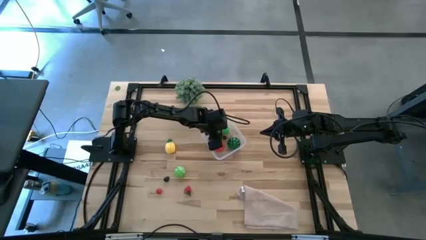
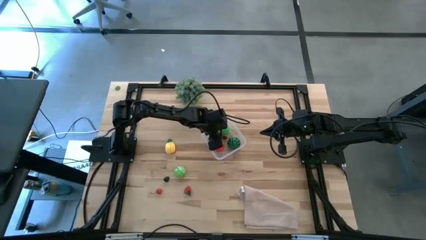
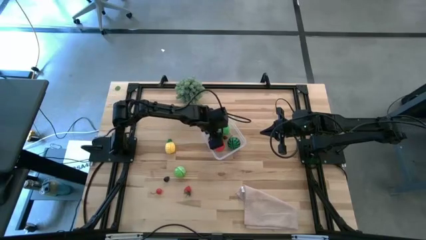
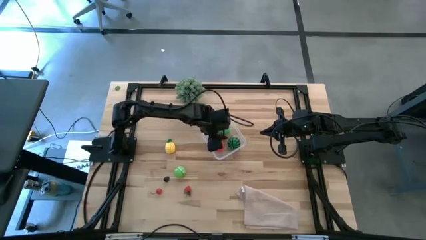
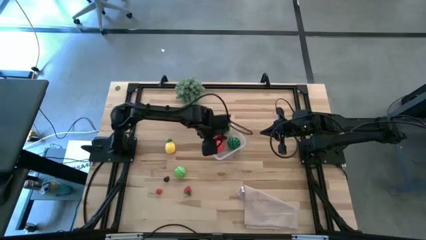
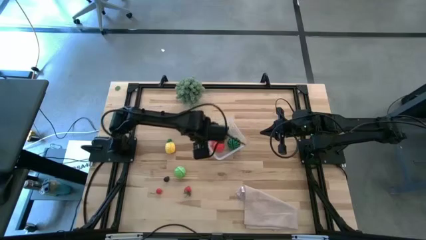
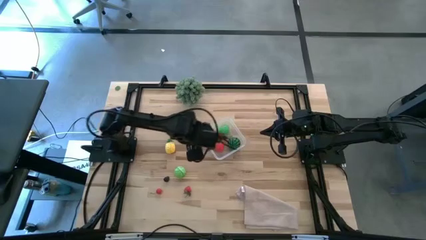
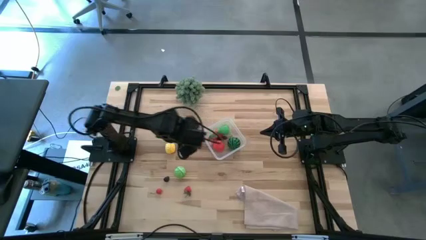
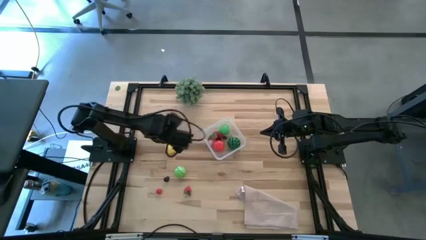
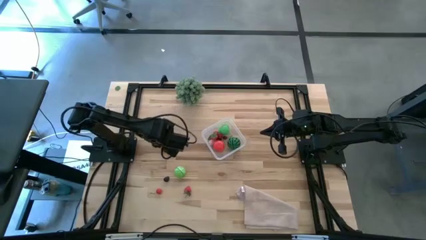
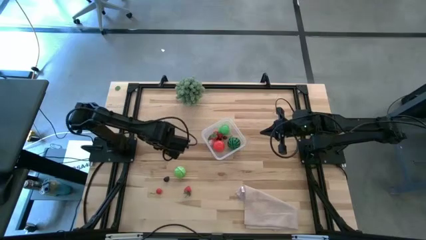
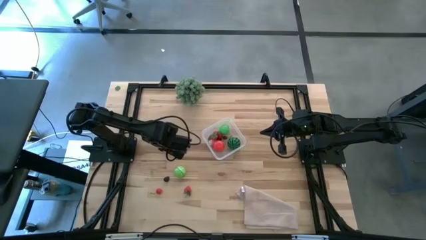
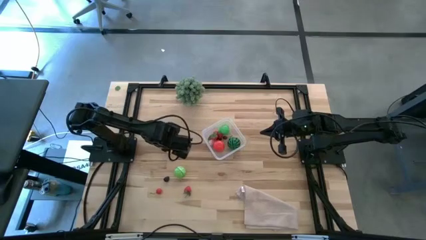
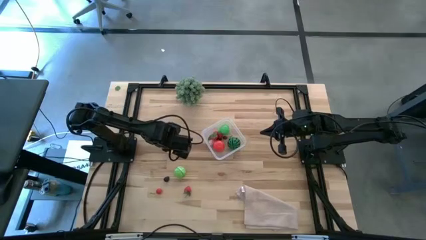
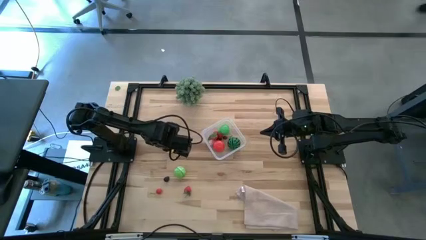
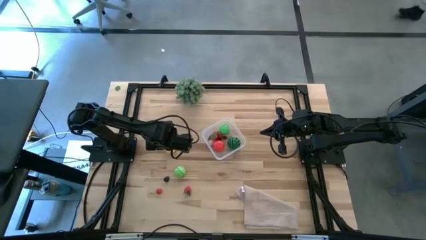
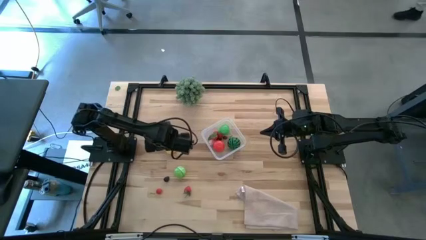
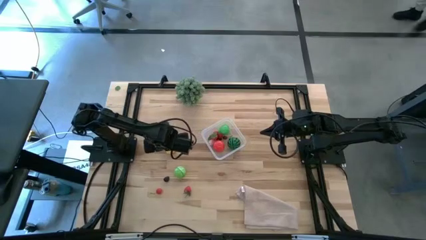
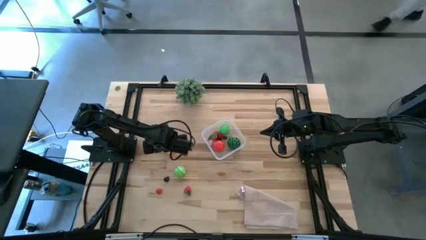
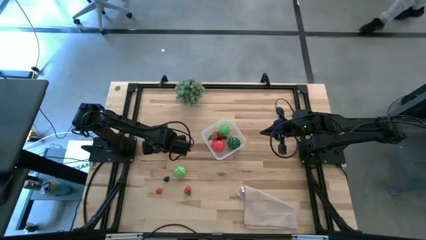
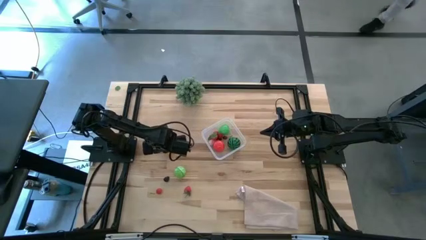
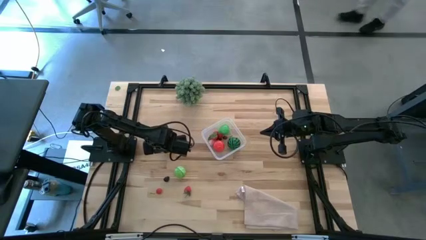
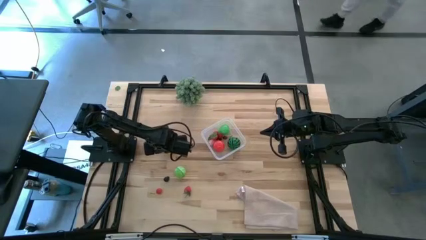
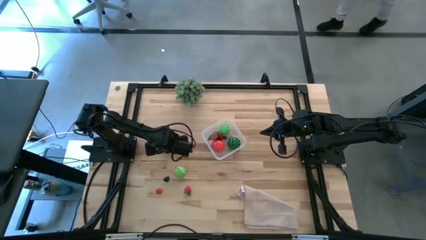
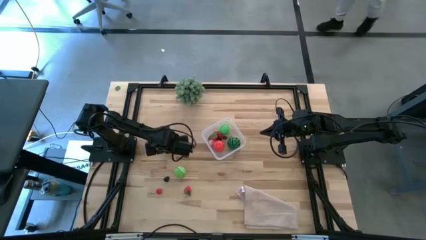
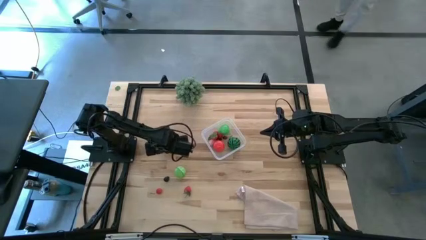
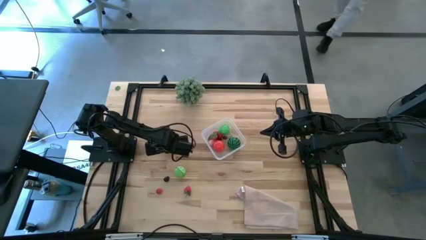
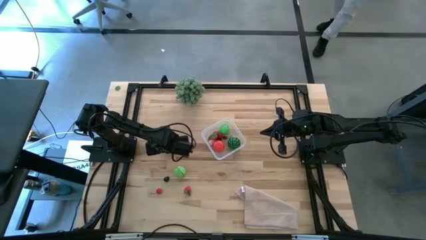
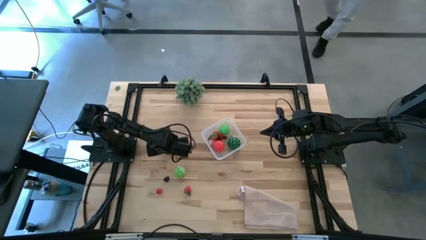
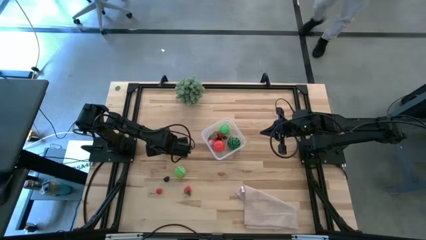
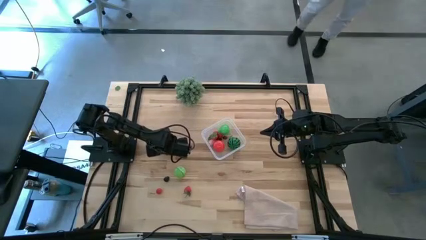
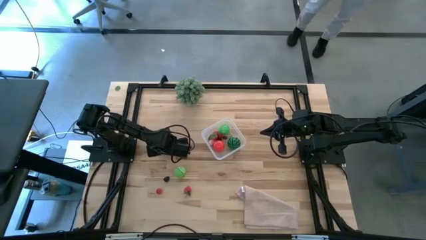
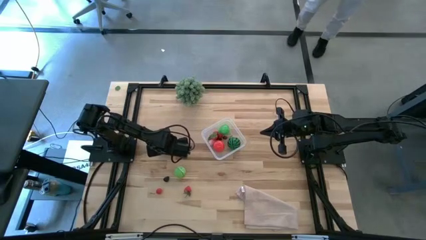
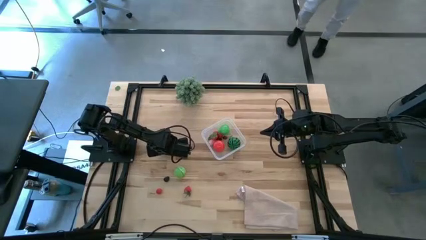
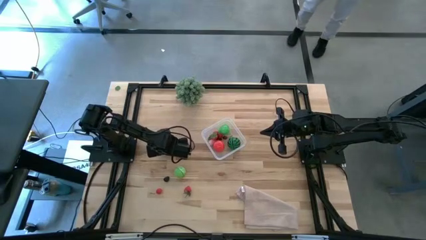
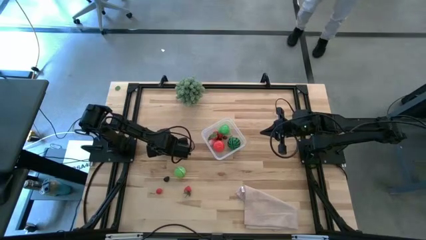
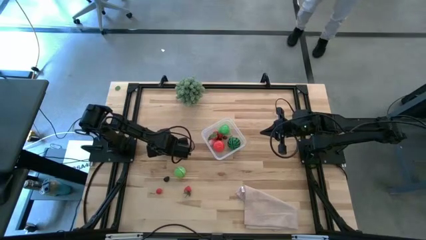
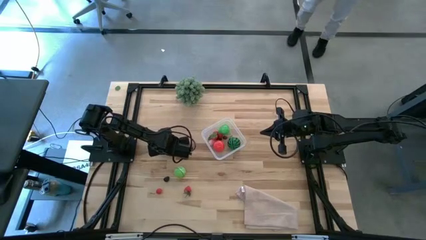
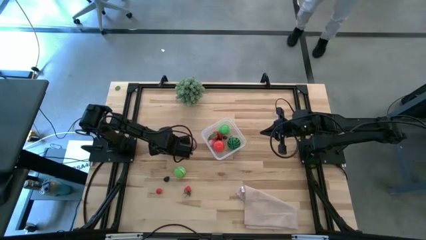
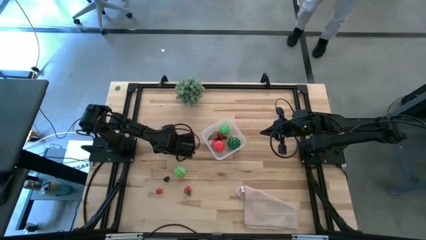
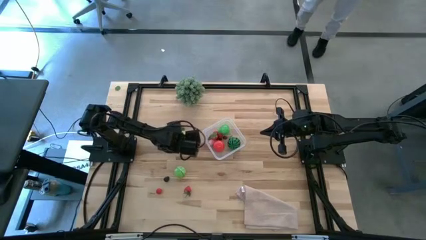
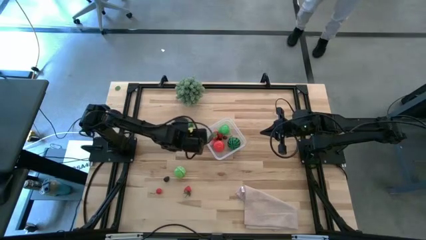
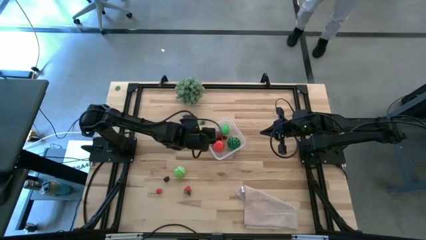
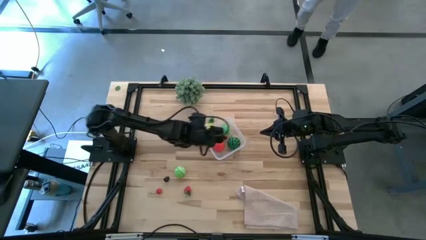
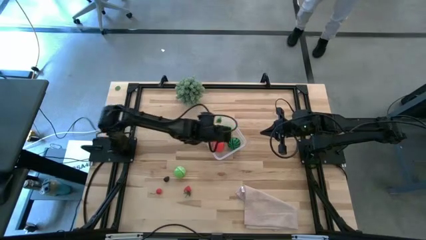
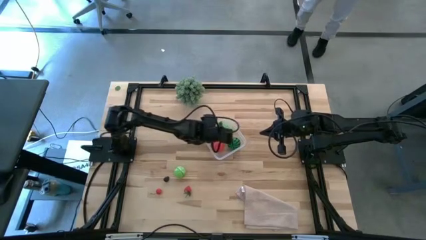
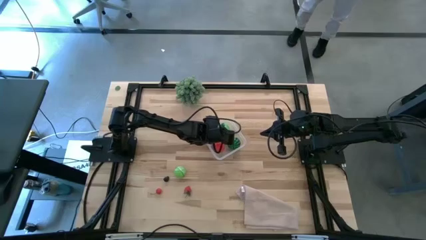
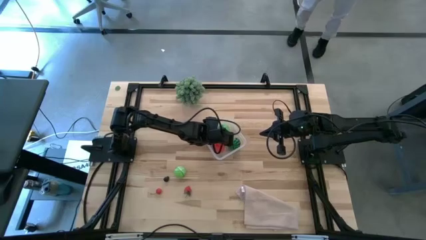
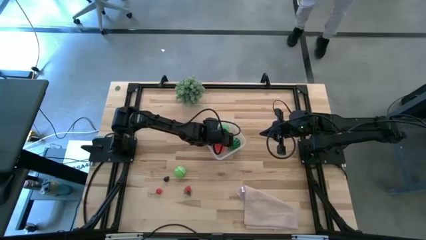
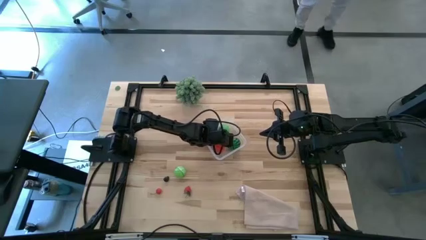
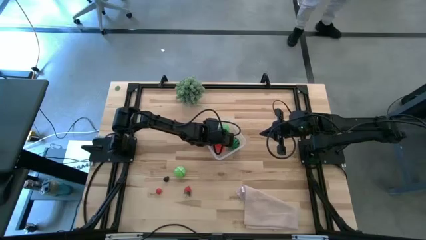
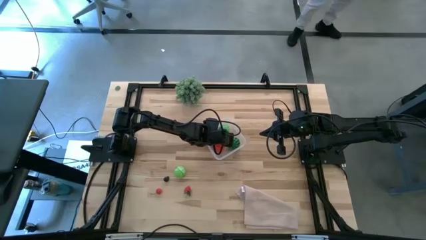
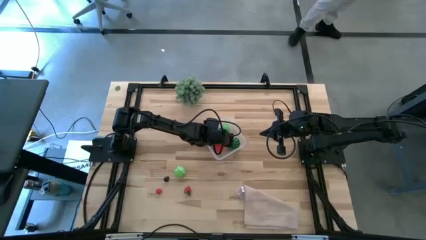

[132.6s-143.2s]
Task: Pick and placing Produce into tupperware
Put the yellow pineapple into the transparent bin

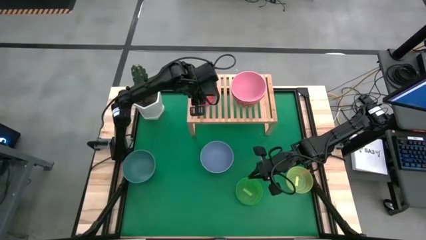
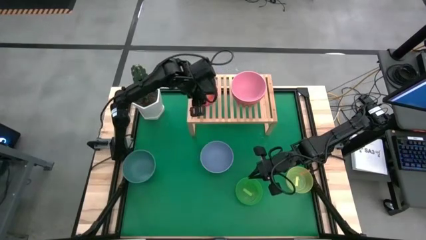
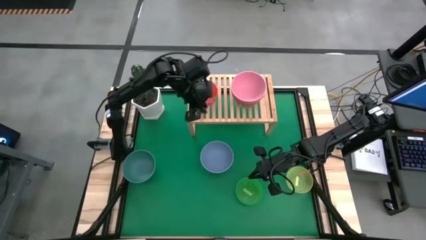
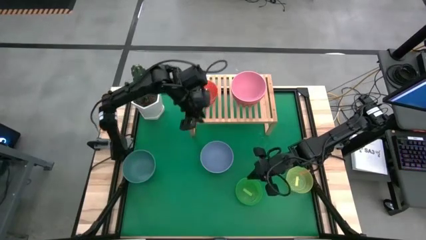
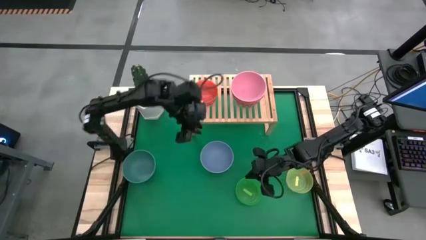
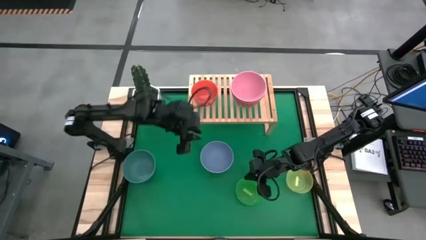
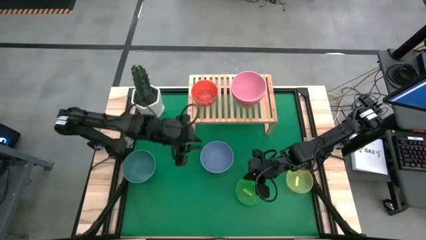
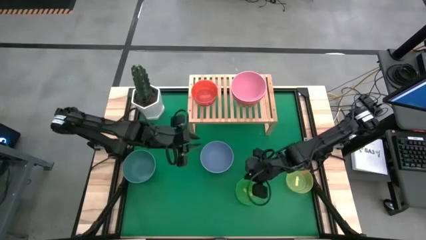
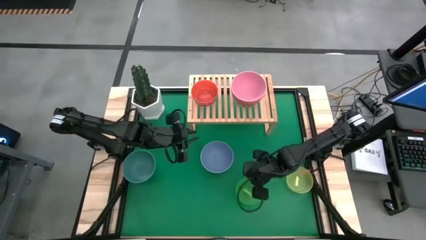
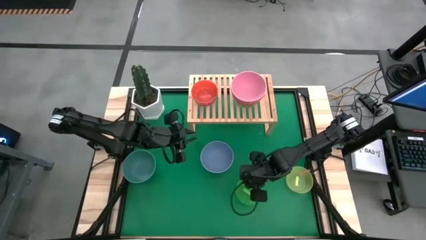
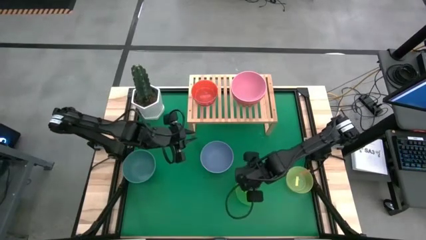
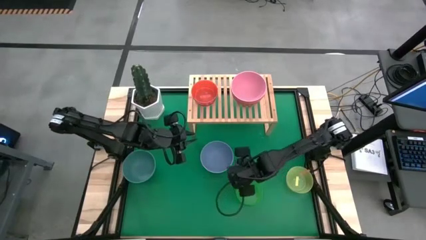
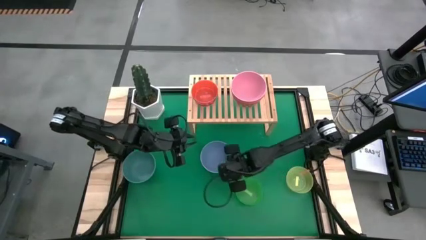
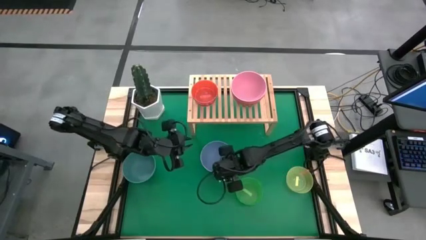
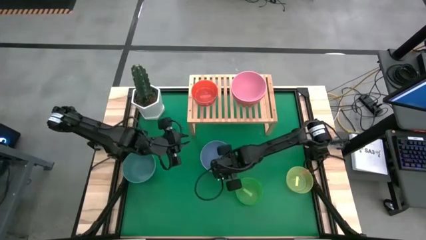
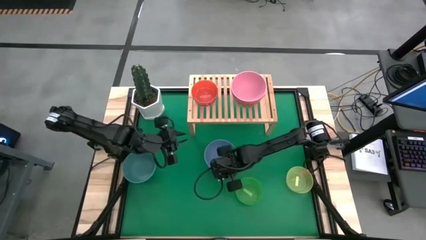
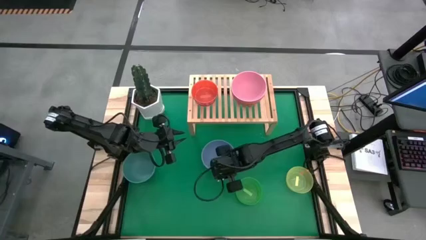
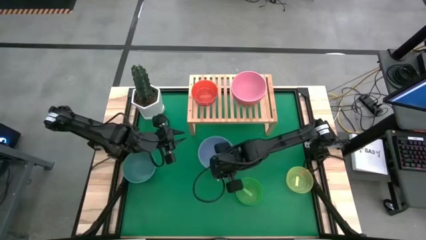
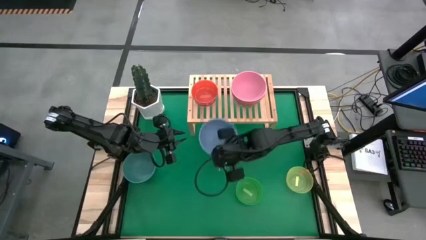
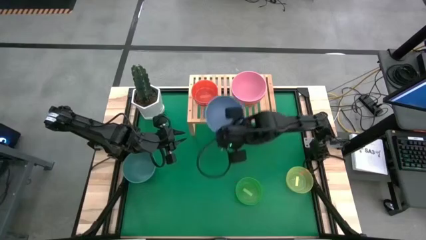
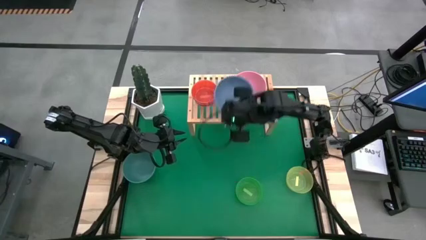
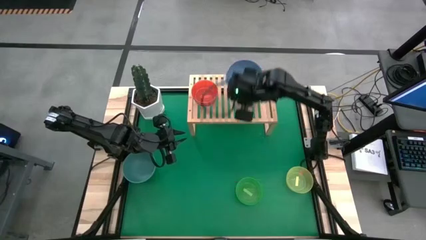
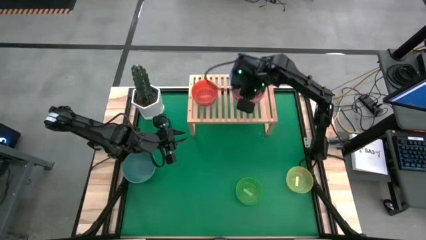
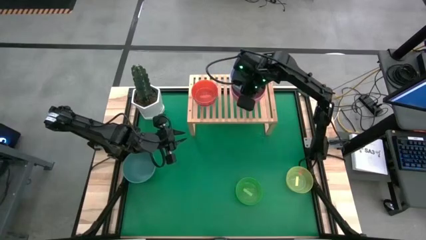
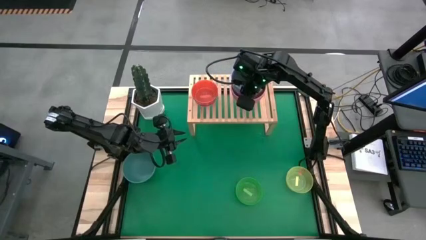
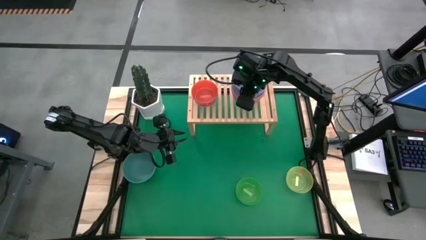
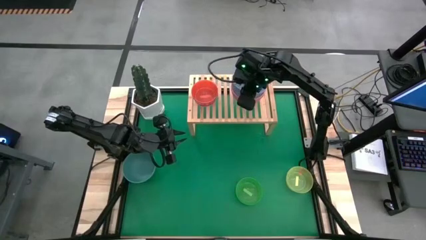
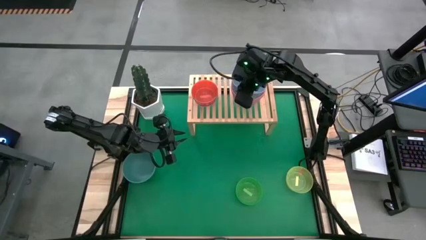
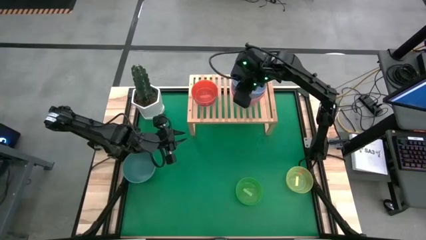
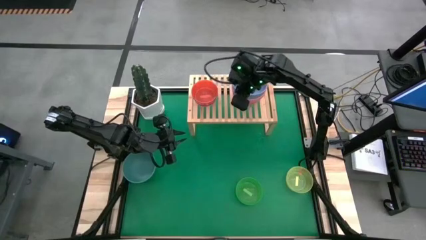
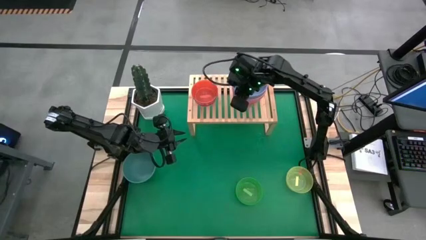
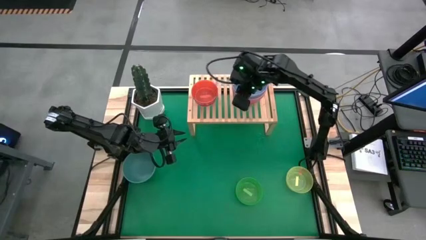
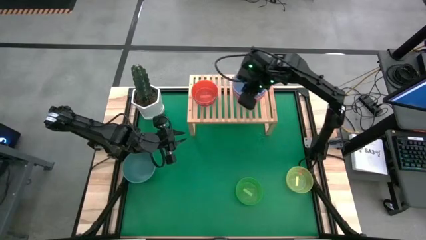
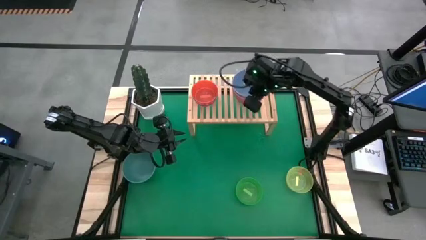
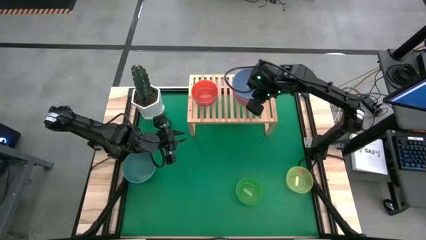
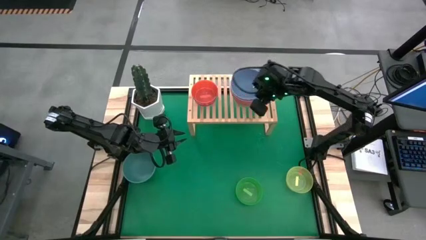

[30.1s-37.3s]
Task: Place and stack bowls onto a shelf
Stack the blue bowl on top of the pink bowl on the shelf
